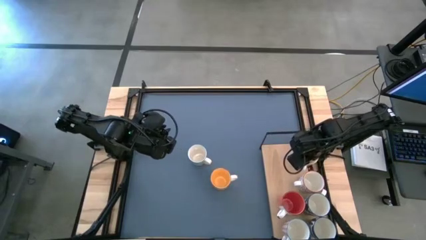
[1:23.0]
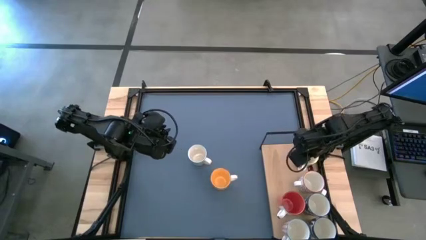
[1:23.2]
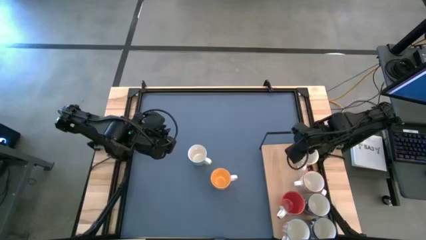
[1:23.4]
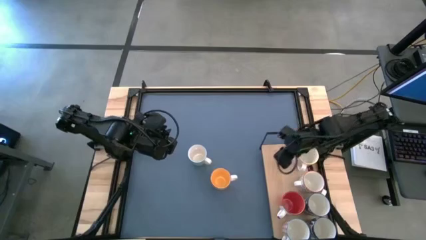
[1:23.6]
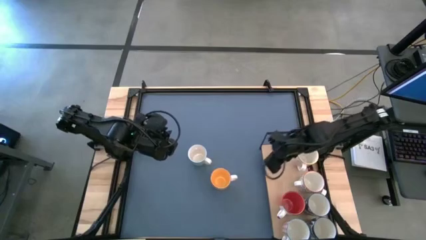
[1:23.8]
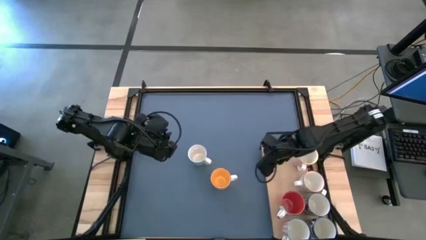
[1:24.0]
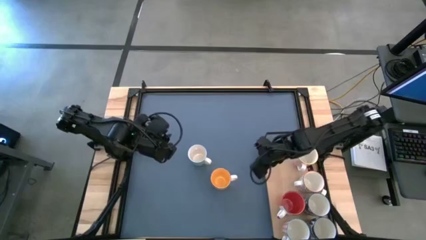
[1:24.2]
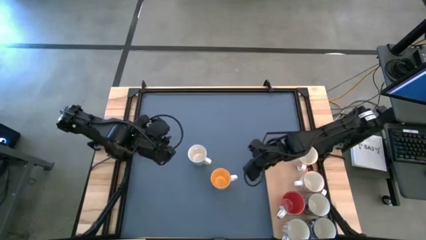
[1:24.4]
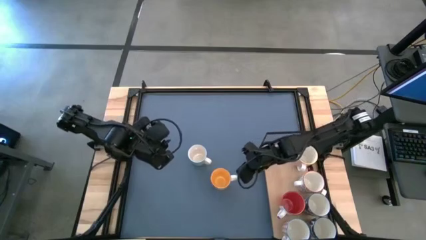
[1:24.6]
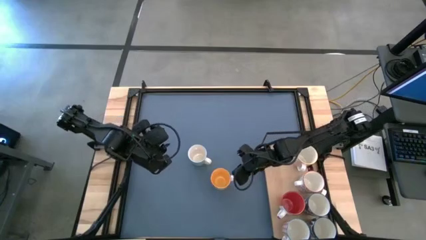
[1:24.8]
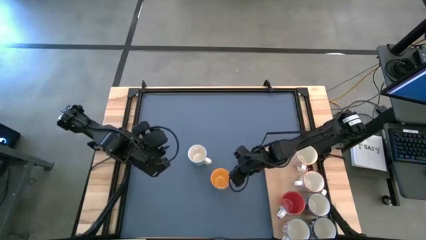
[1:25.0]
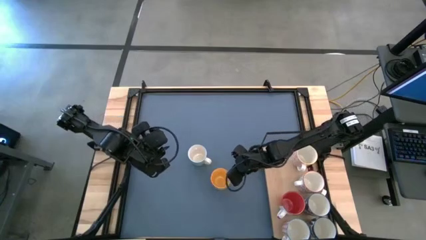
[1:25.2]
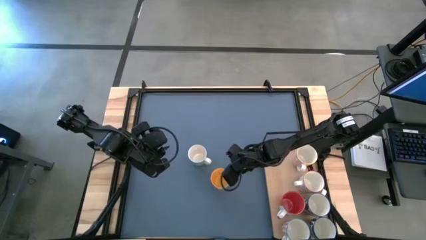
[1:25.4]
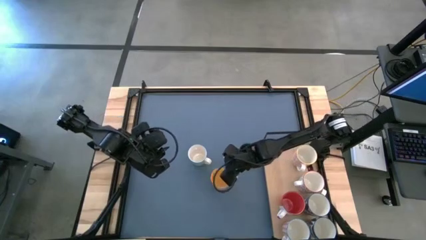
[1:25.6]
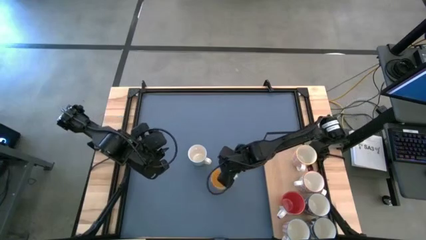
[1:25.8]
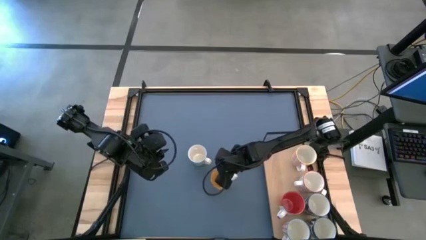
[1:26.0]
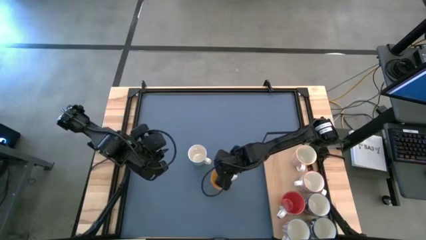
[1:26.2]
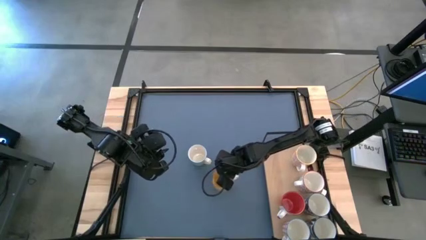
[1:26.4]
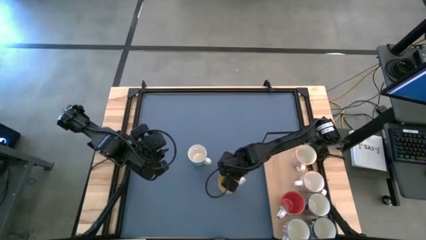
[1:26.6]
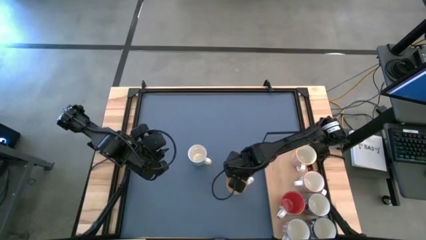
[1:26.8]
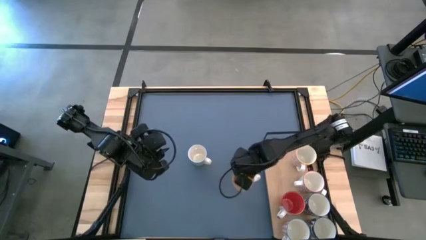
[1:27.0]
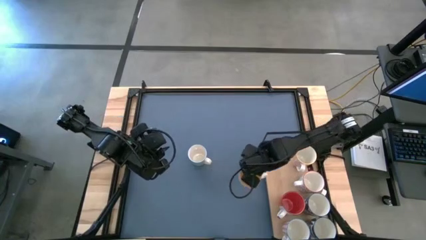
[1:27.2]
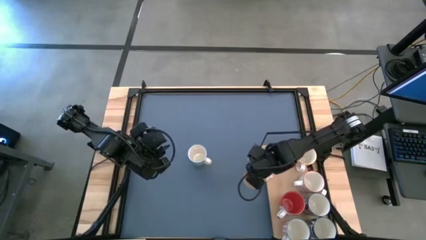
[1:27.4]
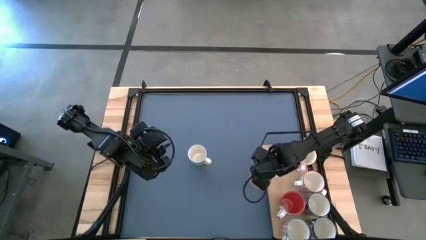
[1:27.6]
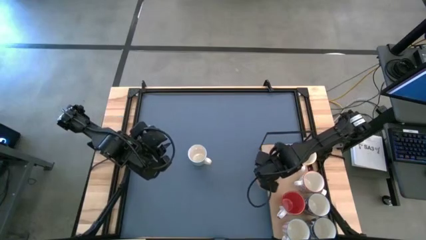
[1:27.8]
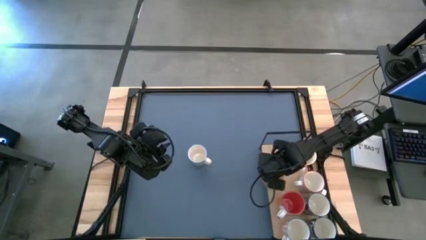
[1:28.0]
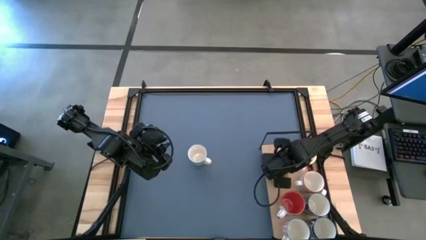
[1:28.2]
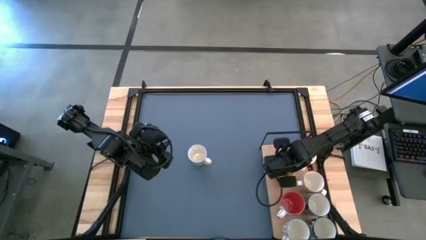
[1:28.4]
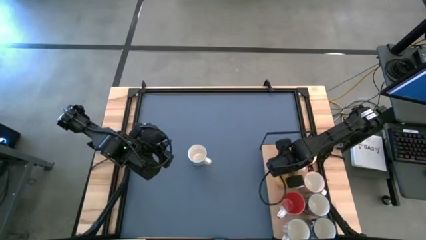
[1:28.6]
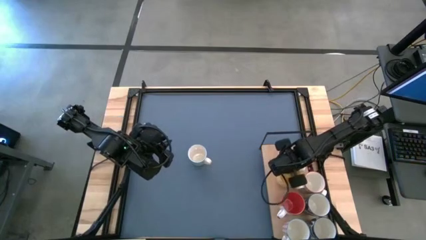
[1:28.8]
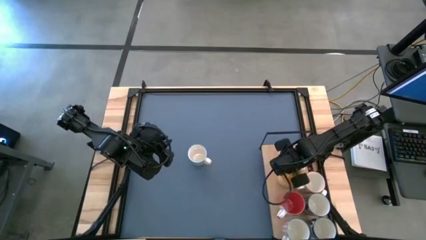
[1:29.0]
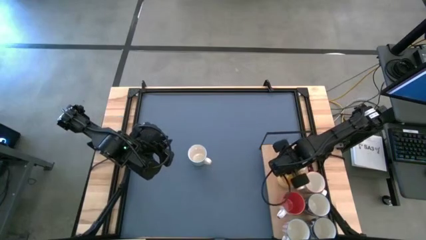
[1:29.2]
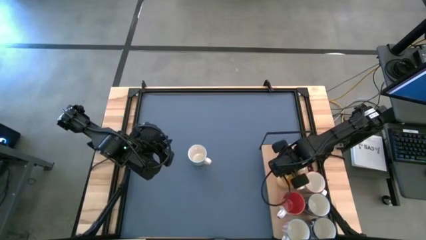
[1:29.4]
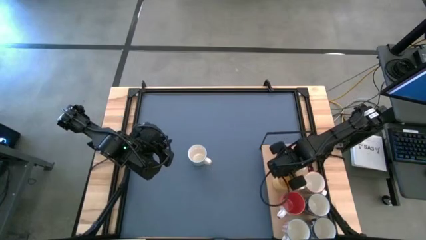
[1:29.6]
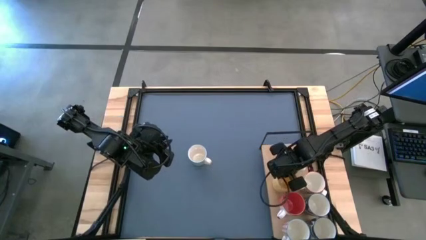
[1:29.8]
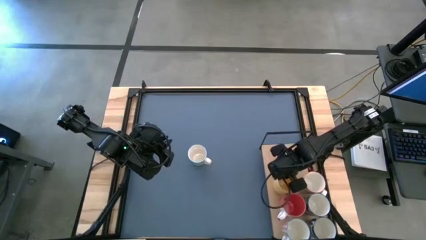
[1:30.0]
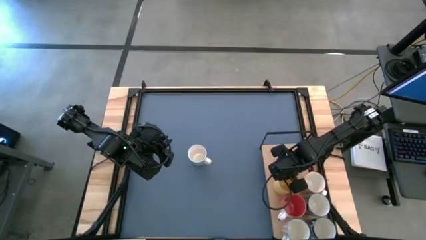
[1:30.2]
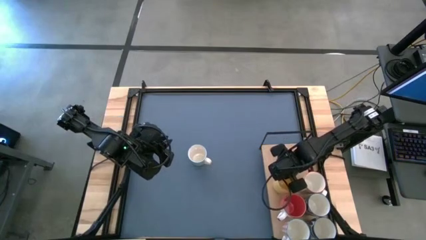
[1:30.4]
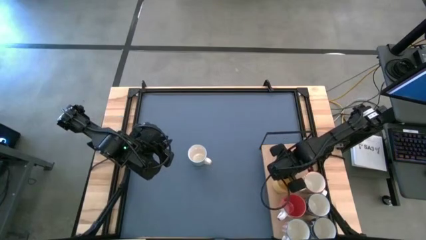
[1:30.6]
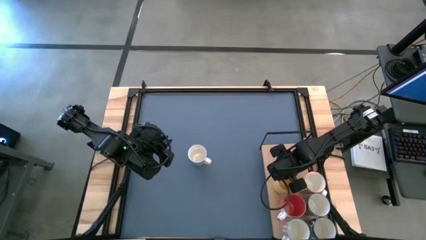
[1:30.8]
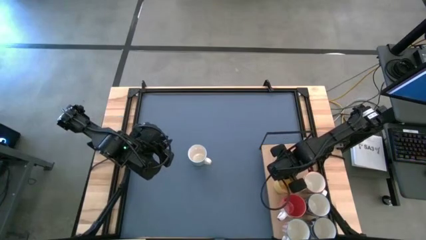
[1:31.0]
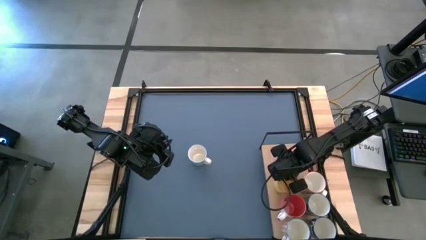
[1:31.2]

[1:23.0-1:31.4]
Task: Place coffee mugs
Put the yellow mug on the shelf

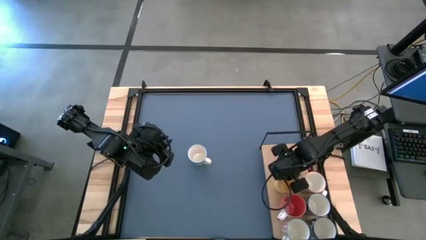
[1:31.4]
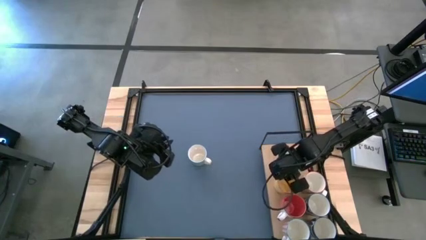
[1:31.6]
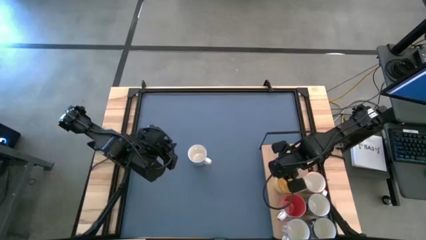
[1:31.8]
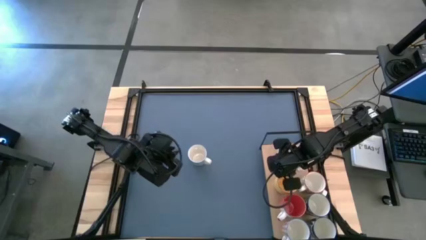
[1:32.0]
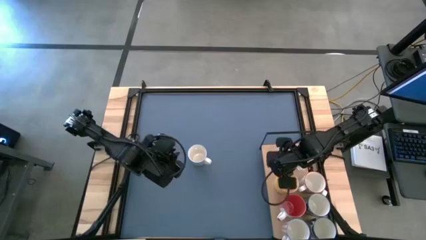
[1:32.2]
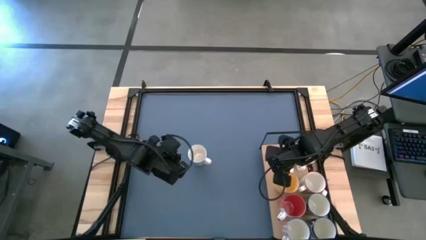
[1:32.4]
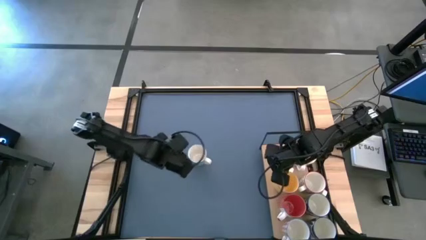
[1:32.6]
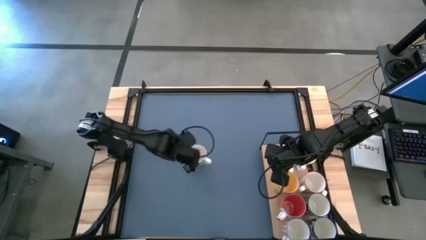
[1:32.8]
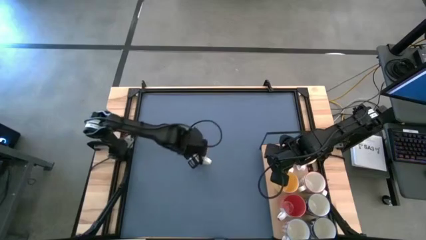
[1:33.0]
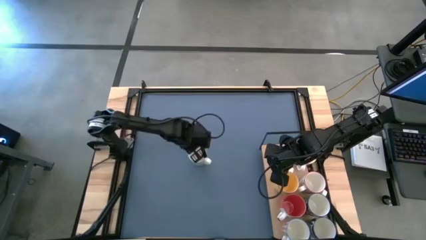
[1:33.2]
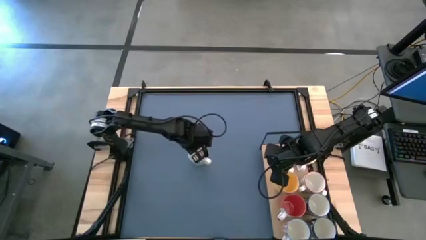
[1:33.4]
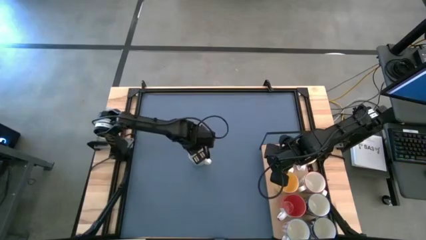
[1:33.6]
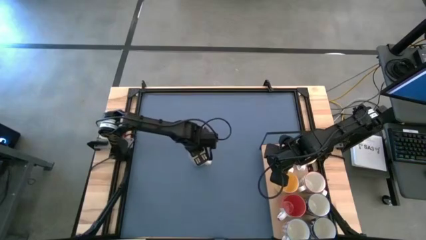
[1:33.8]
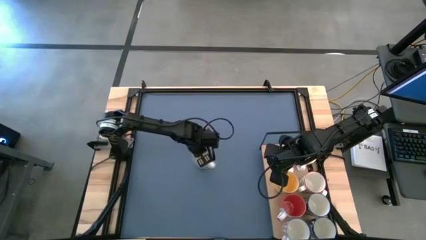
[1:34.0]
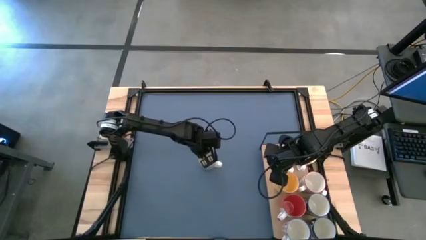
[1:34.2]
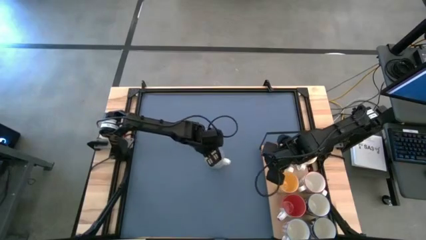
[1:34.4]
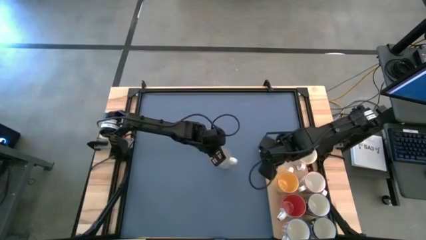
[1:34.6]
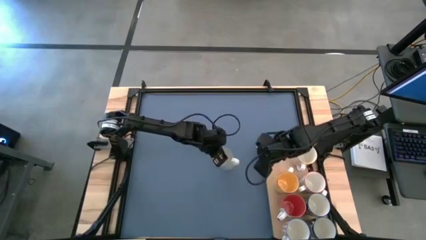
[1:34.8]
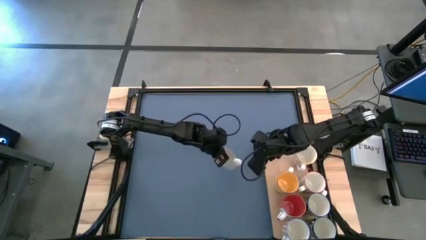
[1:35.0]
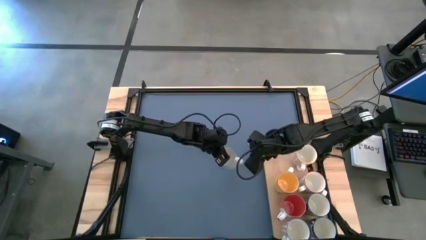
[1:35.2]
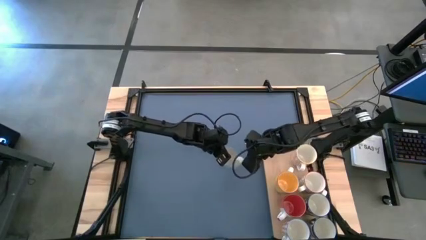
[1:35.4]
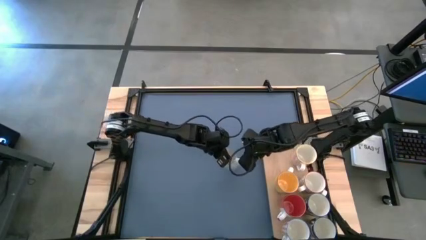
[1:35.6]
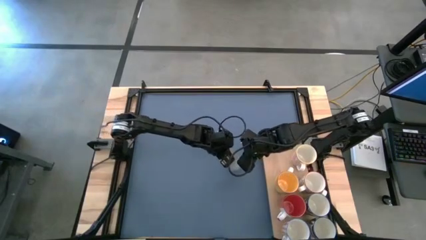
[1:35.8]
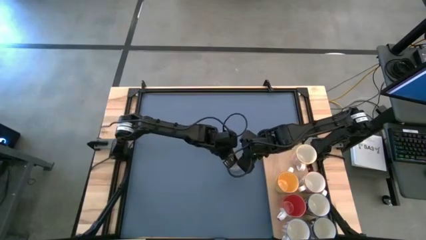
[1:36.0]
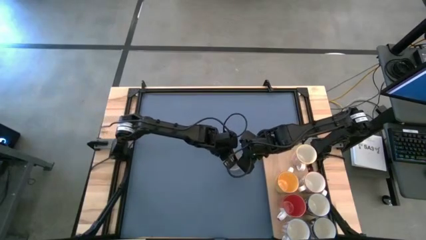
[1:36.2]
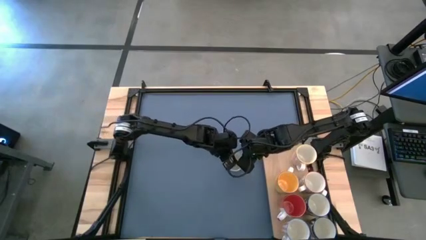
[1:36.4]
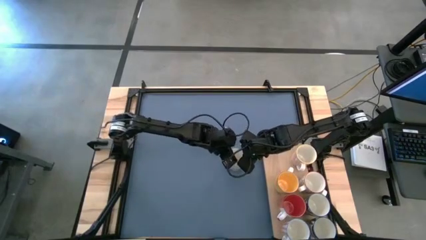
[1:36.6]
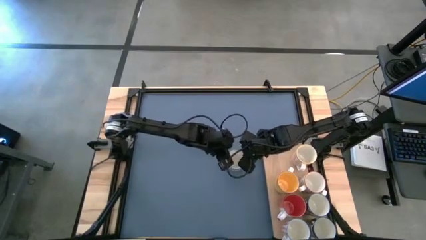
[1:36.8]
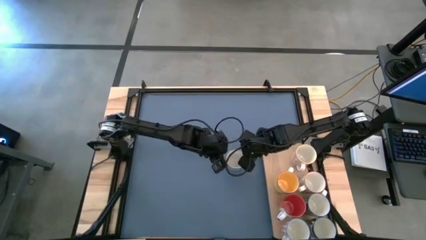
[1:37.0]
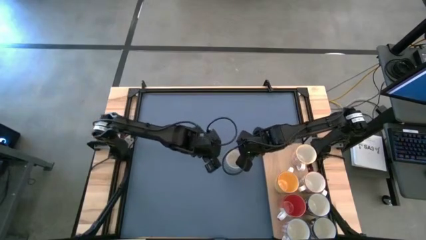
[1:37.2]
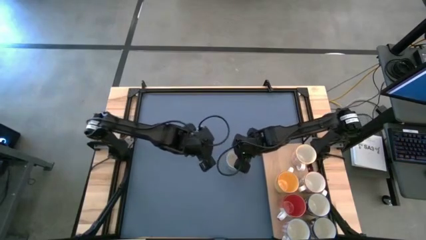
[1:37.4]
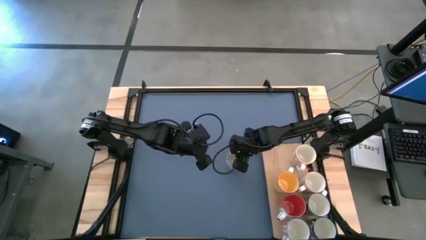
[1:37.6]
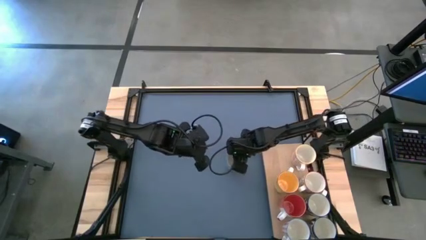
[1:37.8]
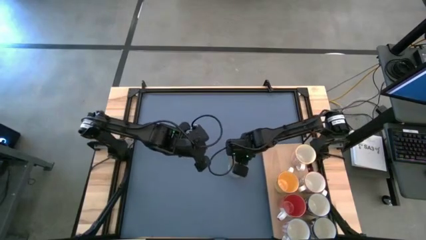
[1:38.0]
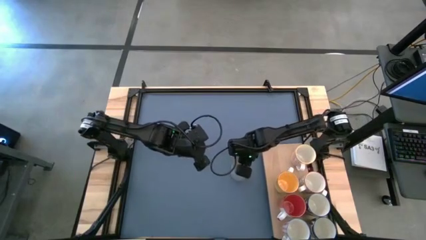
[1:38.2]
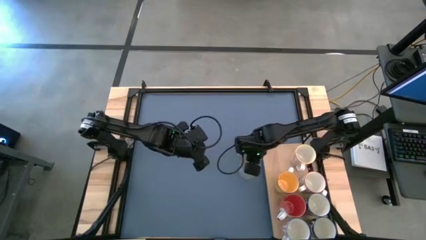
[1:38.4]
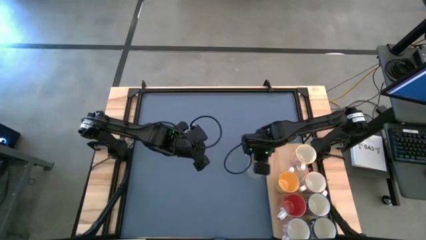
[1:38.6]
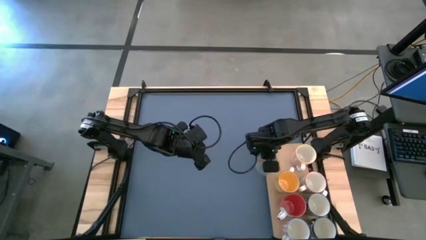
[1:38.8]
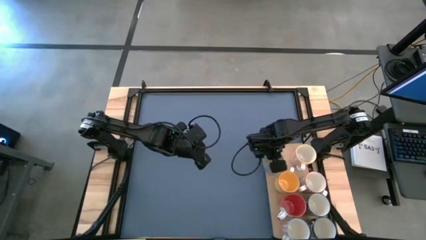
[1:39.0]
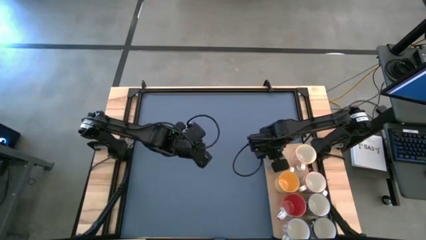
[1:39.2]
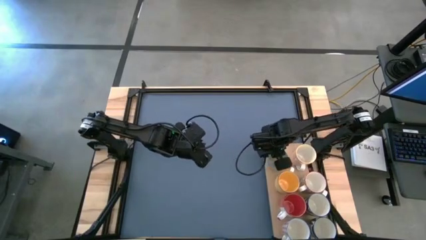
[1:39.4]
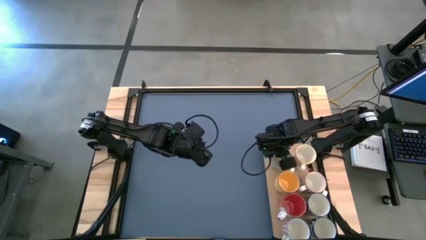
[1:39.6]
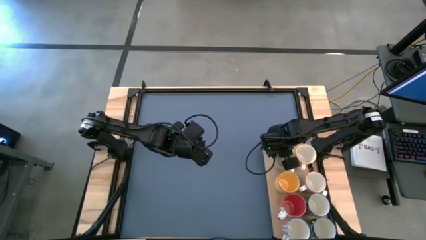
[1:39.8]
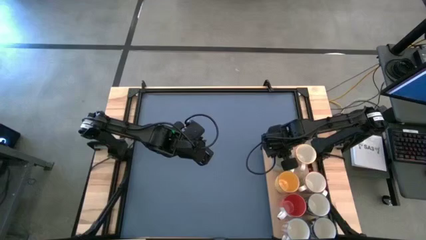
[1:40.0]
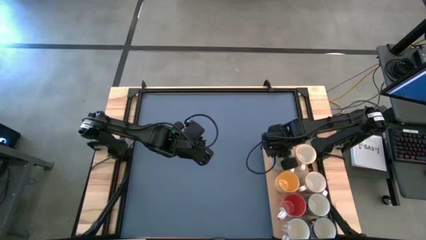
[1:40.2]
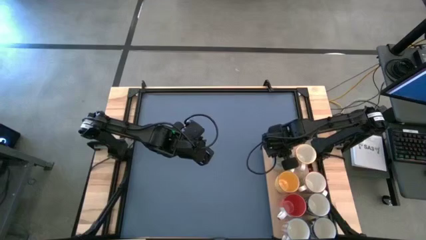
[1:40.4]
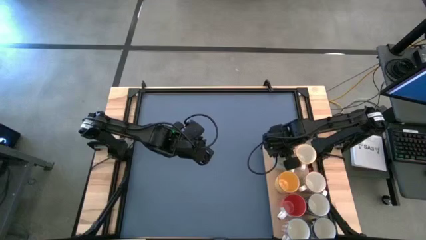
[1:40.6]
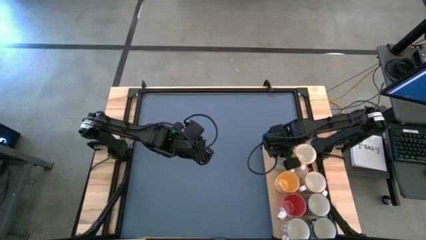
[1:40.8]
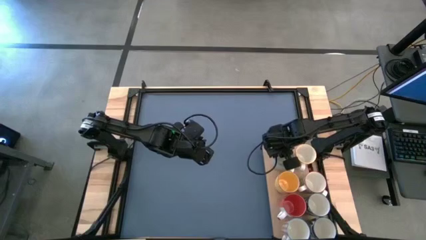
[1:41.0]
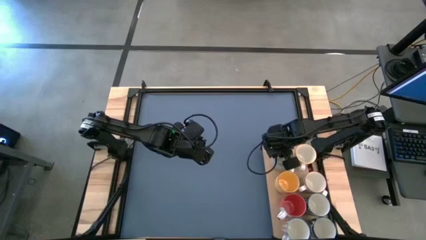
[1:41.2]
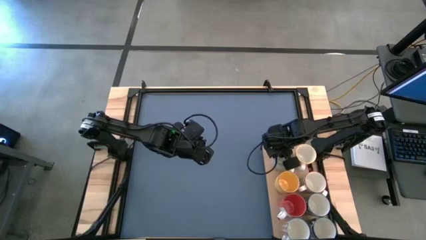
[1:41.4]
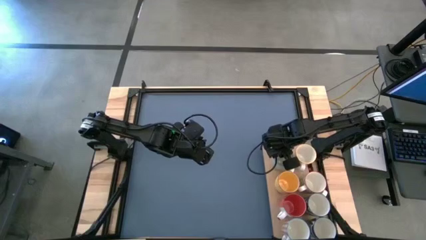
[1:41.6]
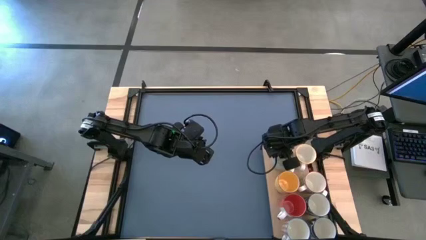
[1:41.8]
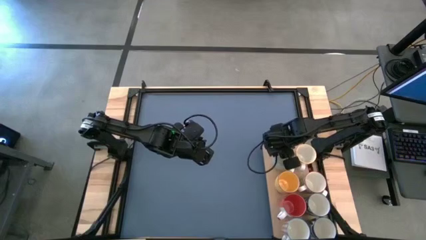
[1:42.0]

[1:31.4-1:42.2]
Put the green pattern mug on the shelf
